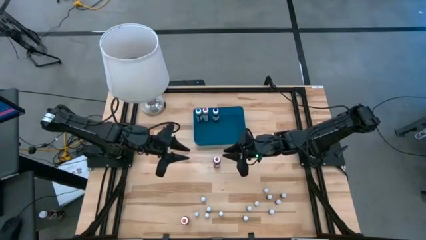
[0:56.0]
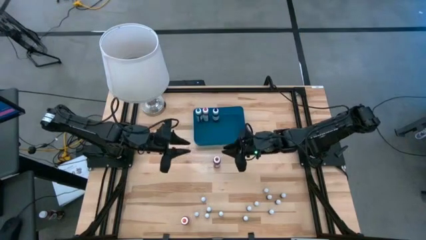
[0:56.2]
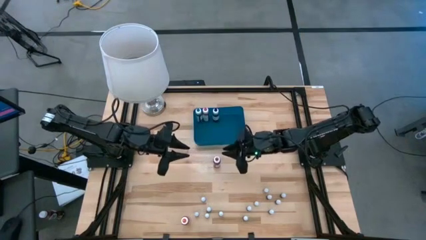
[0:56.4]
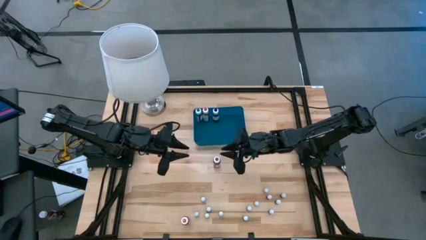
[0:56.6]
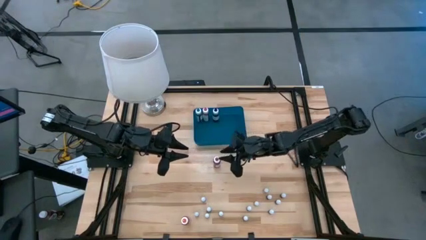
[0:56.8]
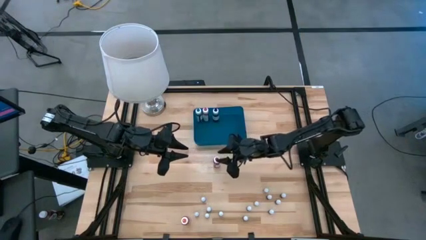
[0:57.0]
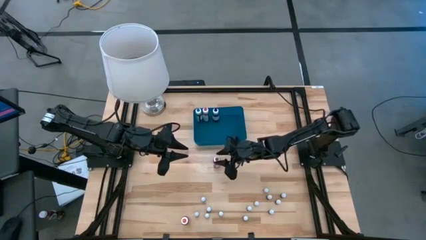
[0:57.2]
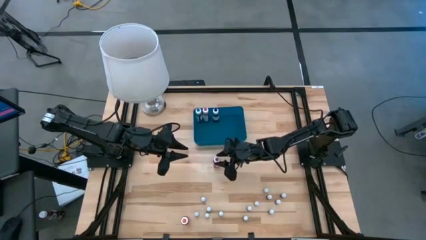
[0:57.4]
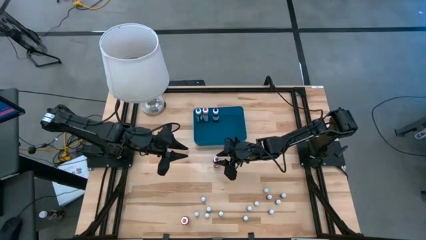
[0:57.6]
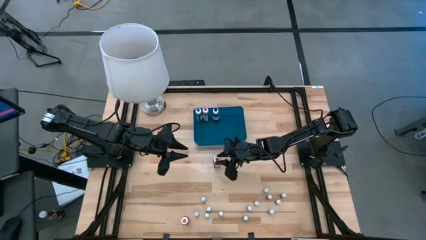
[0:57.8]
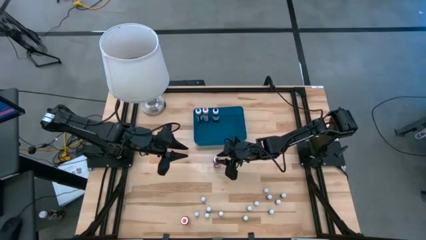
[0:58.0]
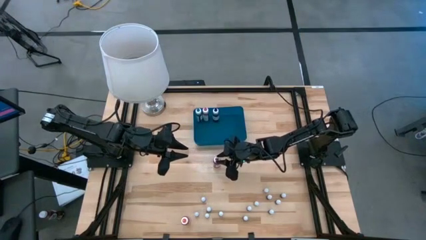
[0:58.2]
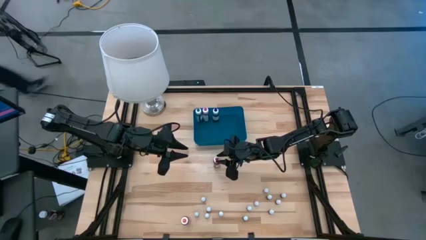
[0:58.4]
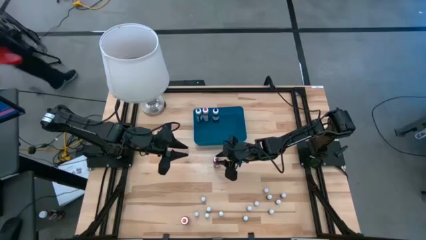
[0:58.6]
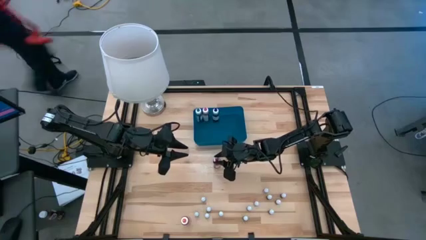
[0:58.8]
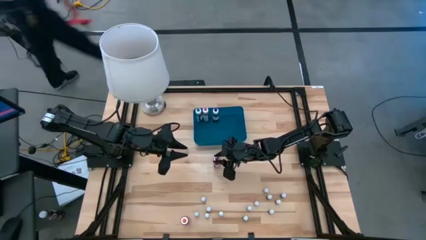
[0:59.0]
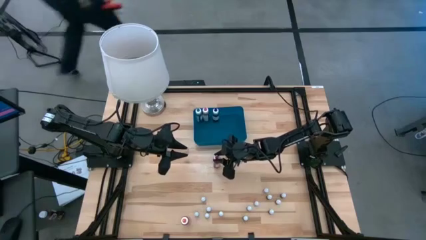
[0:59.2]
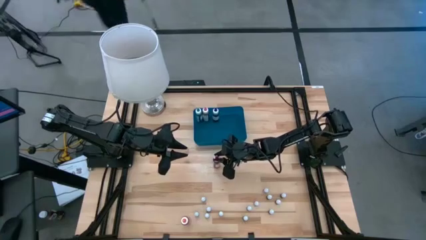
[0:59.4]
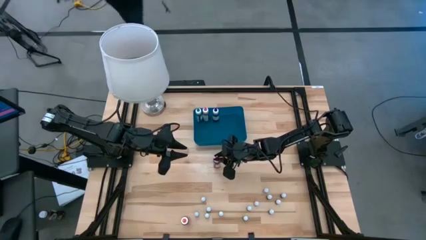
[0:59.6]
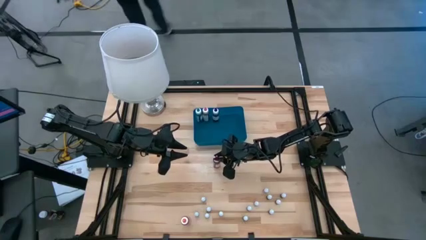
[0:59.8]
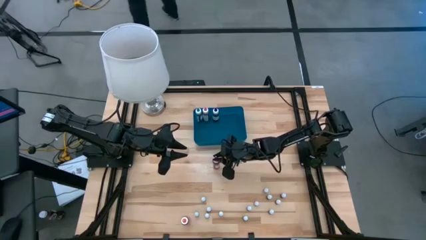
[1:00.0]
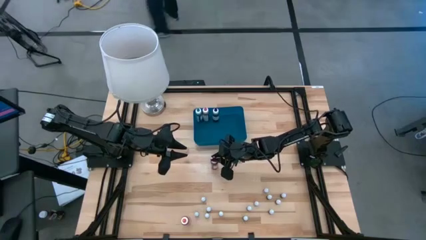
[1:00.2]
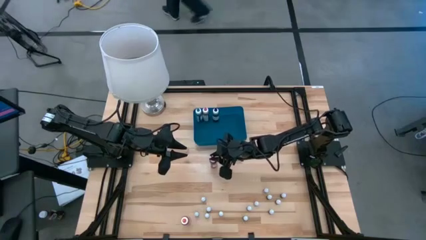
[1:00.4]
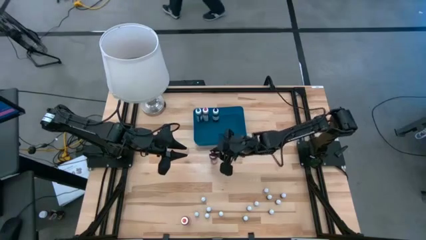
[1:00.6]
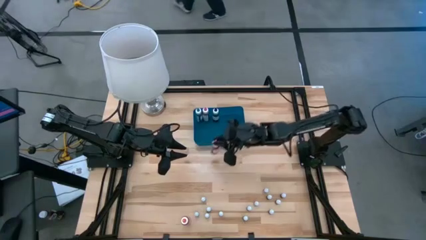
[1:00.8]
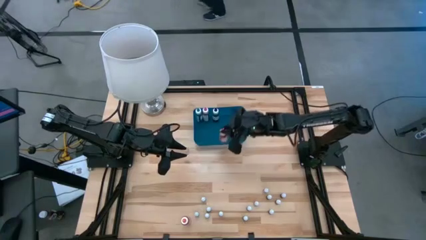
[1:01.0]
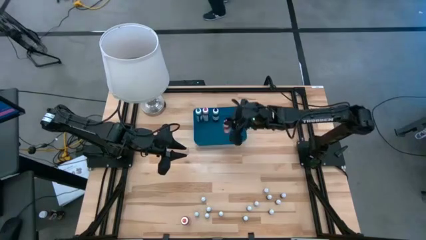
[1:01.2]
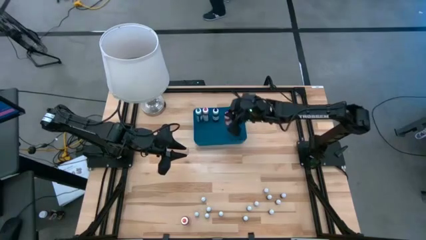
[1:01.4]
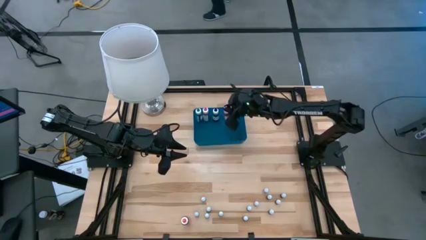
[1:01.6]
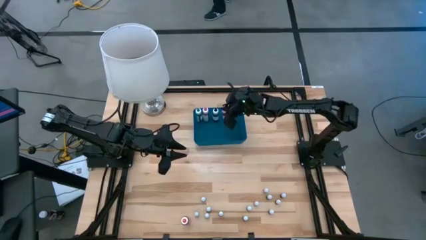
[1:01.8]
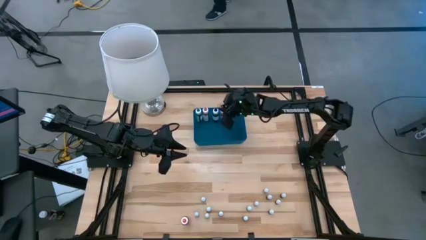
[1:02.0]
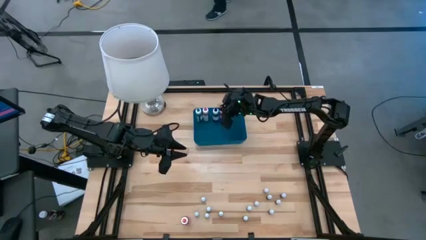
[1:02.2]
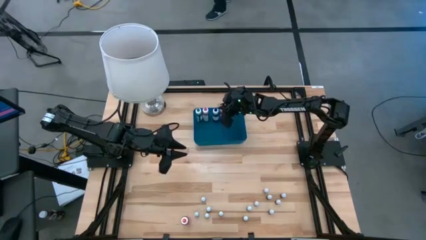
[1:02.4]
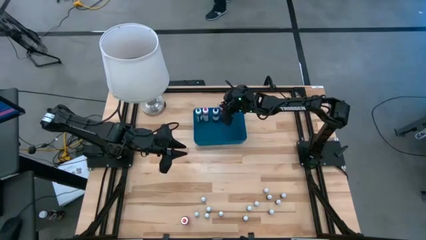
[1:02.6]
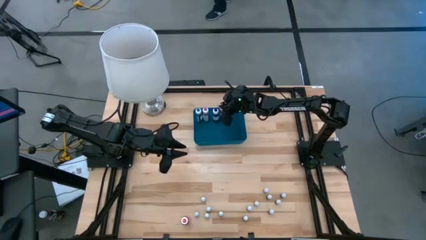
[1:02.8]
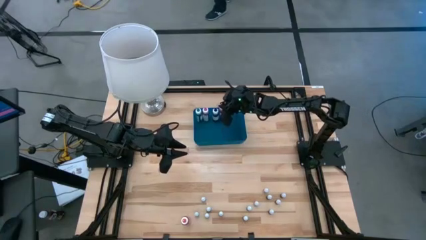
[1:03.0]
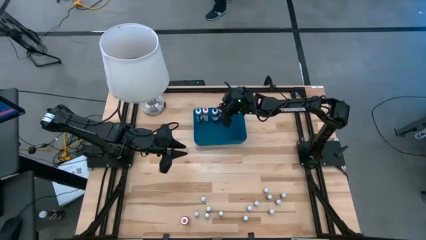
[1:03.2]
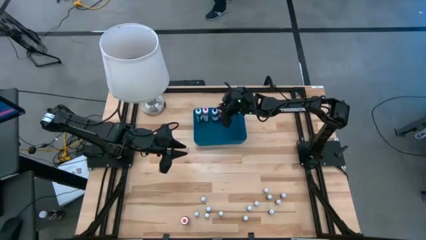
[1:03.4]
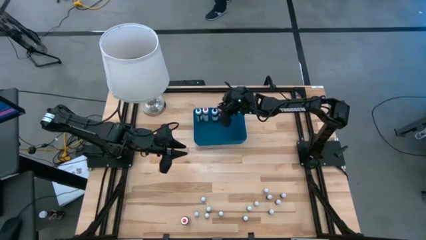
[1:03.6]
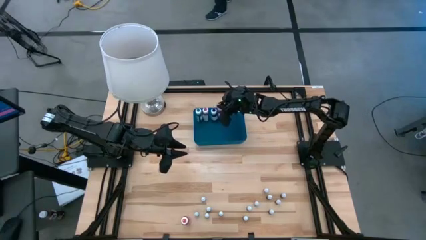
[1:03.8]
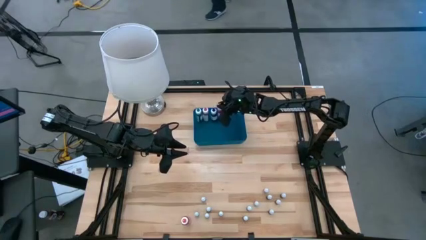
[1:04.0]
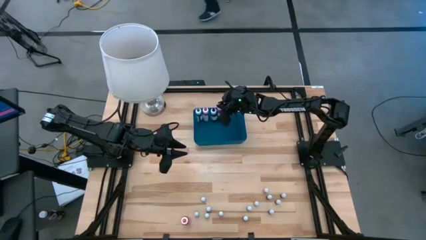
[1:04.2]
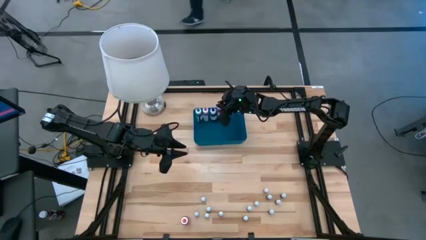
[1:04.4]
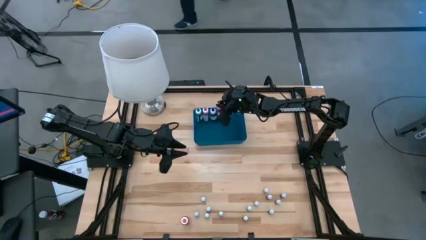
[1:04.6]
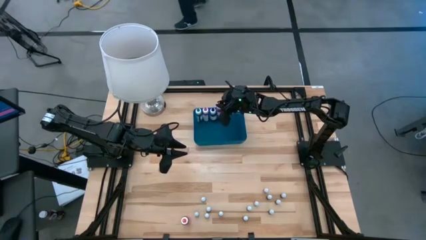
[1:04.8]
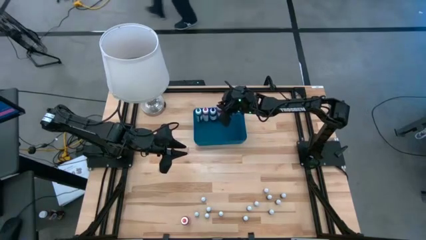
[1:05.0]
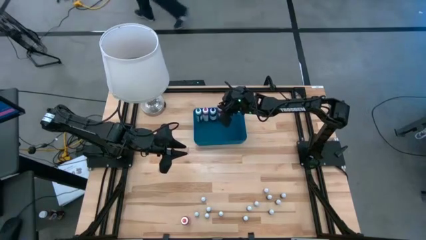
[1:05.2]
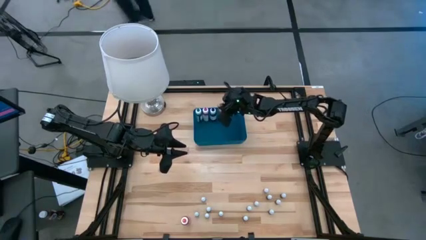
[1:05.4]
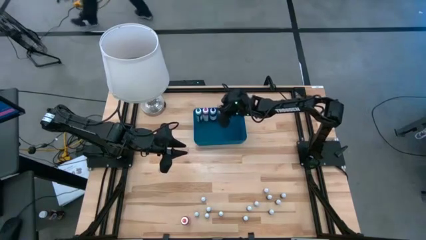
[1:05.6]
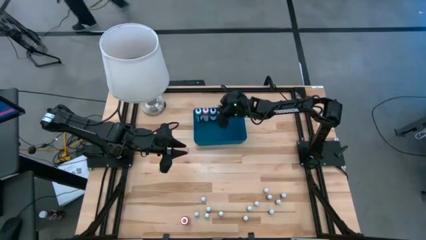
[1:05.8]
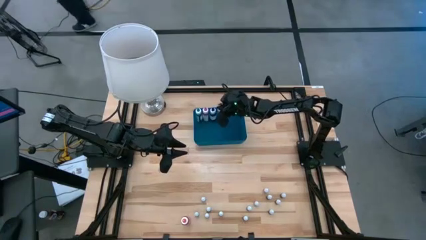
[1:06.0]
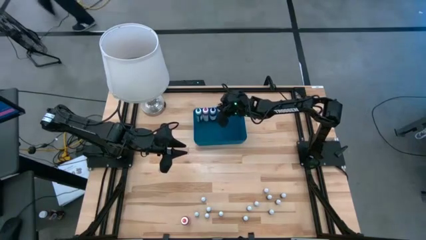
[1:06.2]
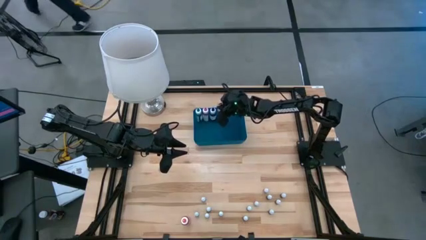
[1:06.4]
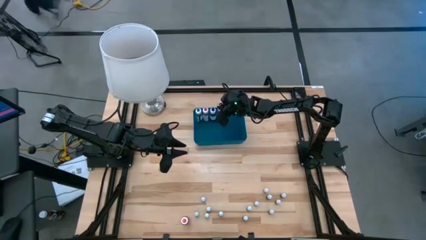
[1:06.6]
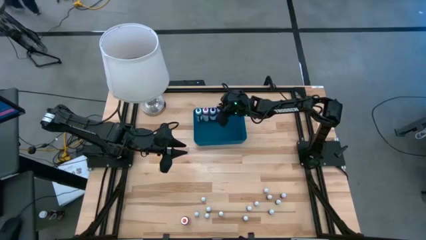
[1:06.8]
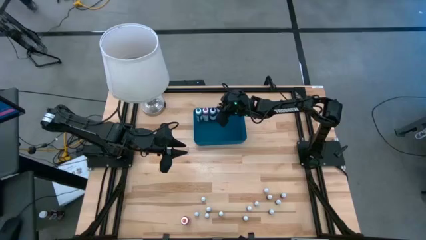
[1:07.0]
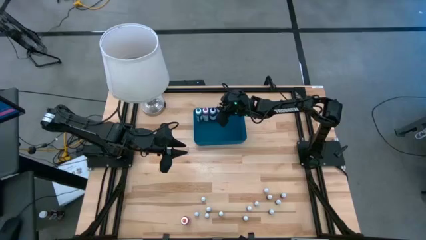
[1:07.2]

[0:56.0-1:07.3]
Task: Pick & Place food coloring
Put the large red food coloring bottle into the bin
